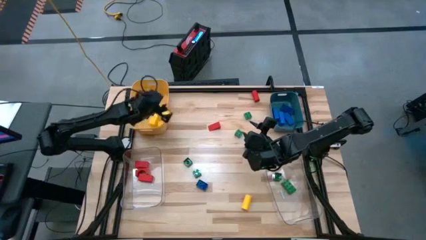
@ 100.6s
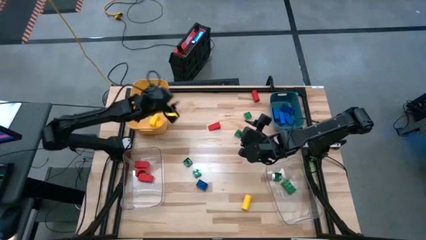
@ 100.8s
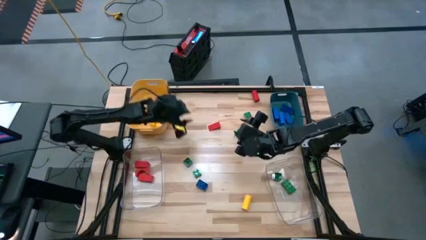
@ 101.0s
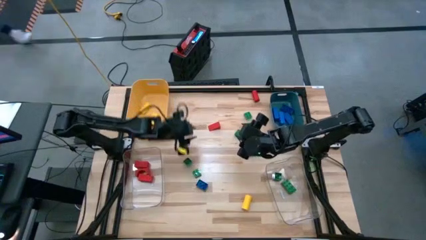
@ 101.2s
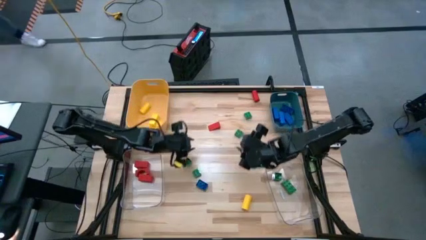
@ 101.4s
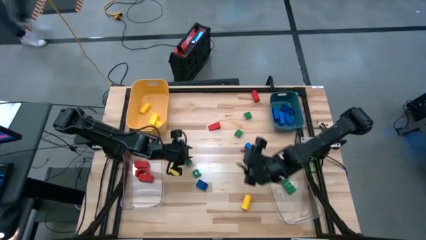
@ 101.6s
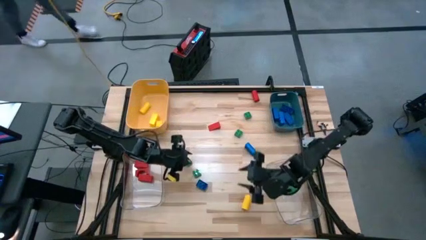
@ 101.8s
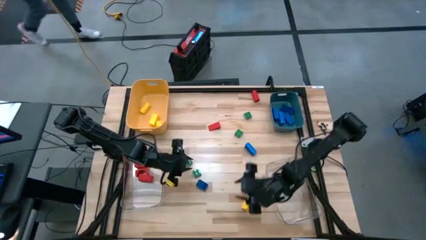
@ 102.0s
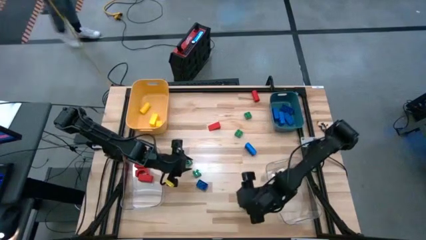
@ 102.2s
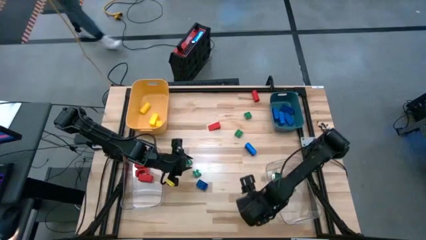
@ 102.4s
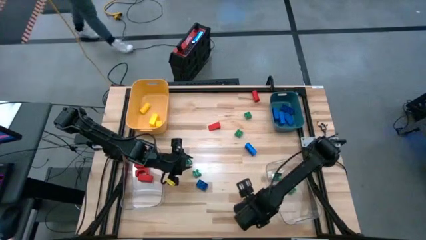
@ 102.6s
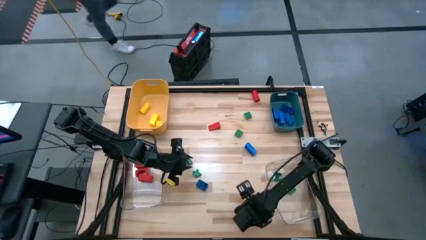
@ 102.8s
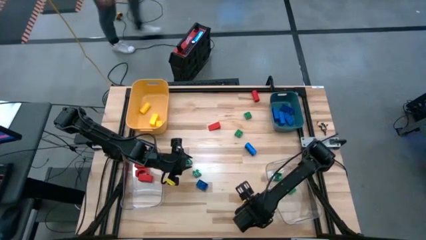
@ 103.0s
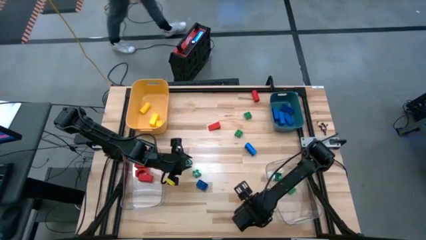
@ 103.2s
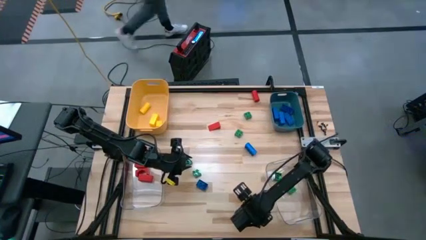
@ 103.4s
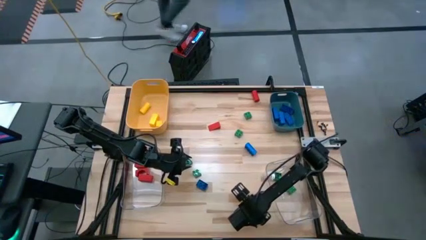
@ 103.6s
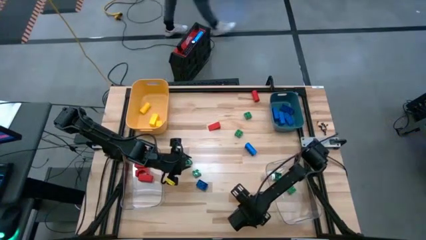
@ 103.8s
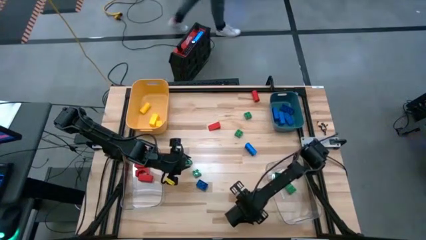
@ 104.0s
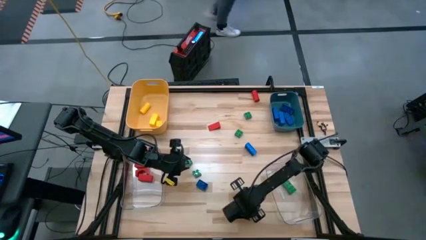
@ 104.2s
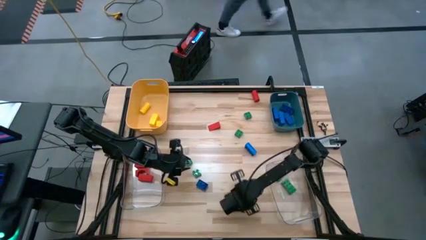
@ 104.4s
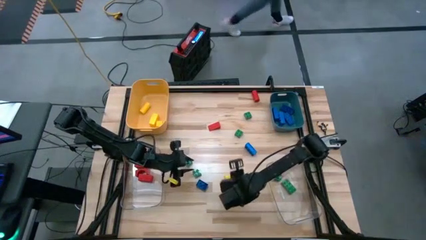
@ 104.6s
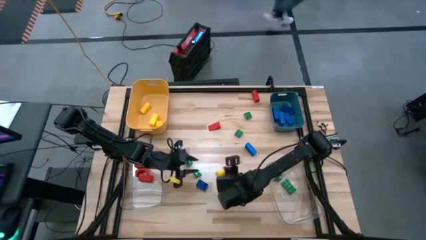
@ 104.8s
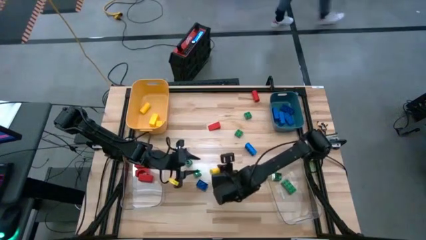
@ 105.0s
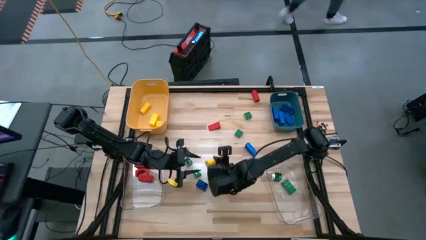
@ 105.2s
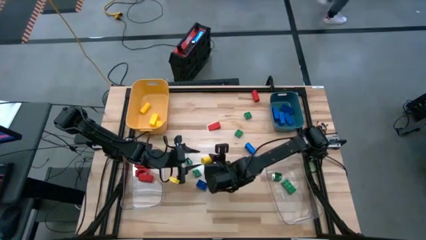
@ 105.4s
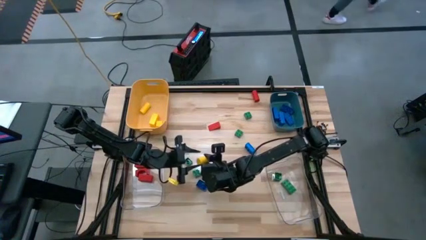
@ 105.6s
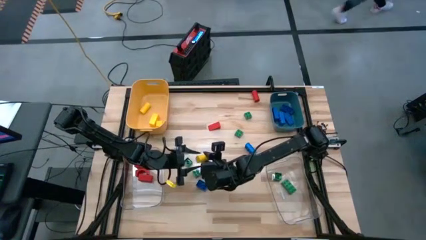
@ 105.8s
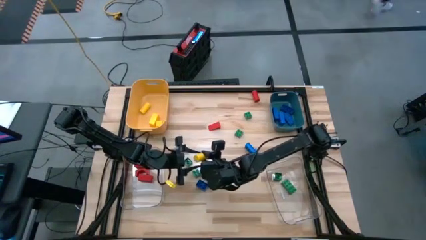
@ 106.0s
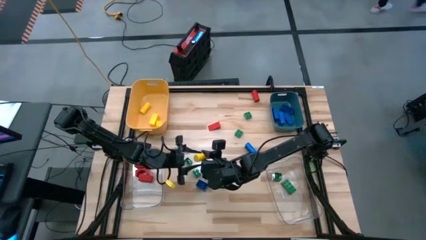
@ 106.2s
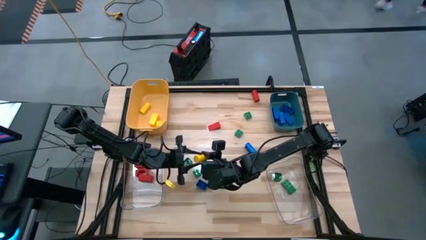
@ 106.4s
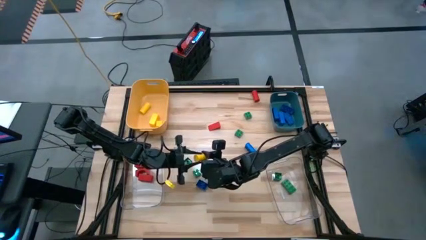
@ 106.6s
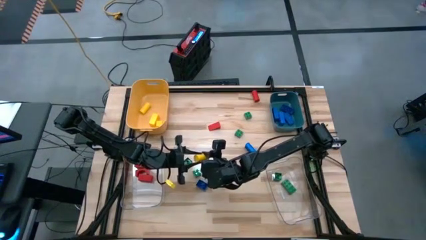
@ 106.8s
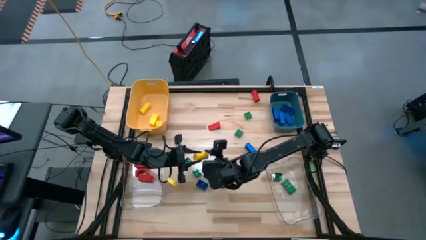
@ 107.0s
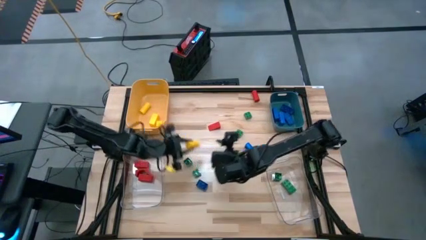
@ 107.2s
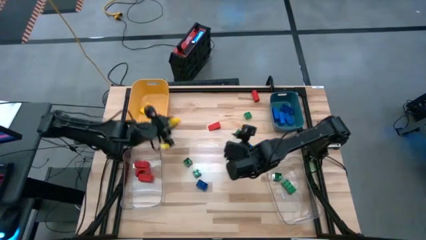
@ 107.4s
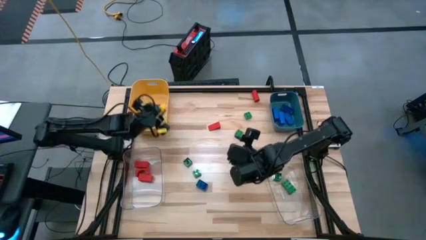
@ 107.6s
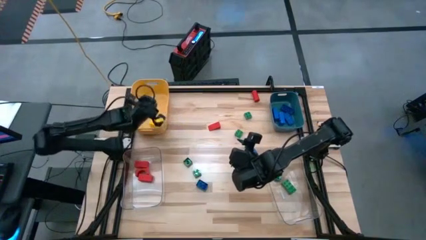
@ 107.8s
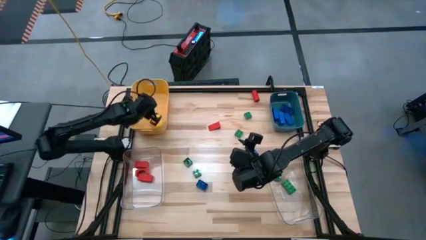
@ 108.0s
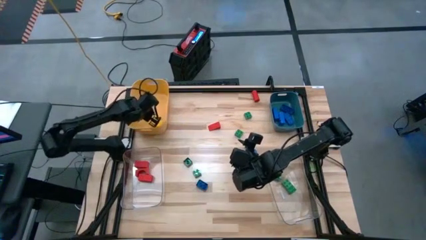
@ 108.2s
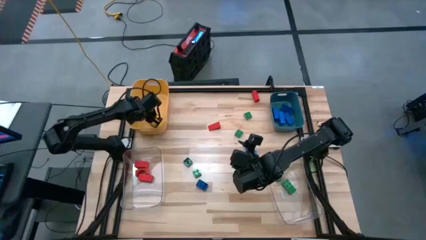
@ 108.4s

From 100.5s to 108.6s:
Task: Sort blocks
Put the yellow wooden block into the yellow bin

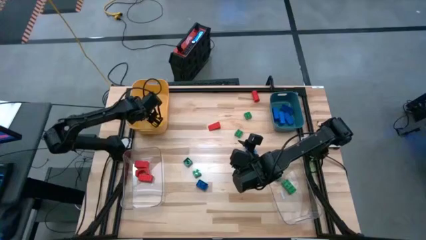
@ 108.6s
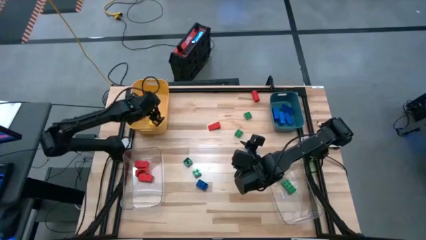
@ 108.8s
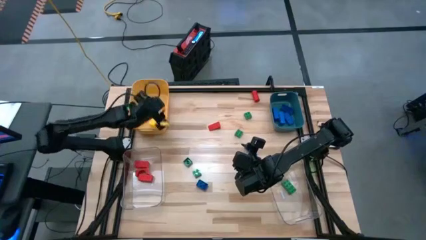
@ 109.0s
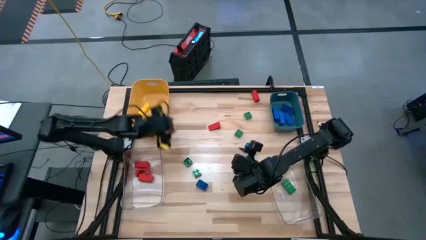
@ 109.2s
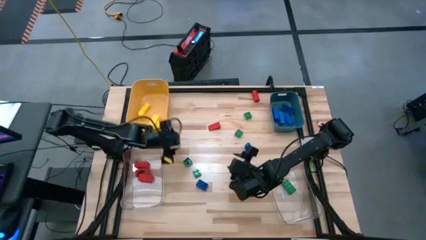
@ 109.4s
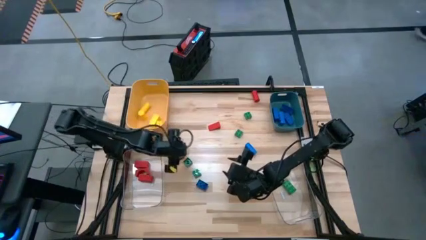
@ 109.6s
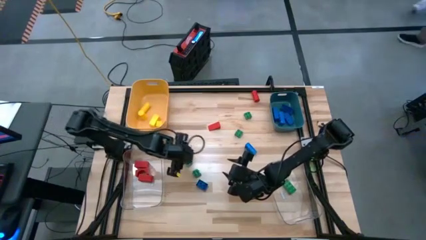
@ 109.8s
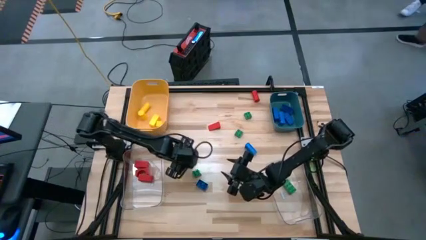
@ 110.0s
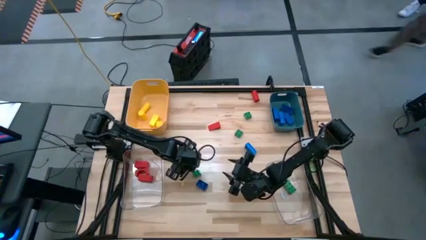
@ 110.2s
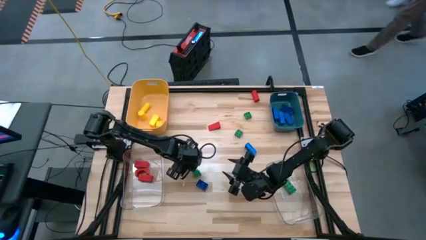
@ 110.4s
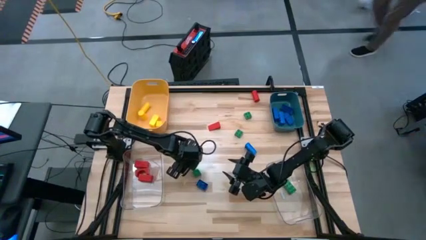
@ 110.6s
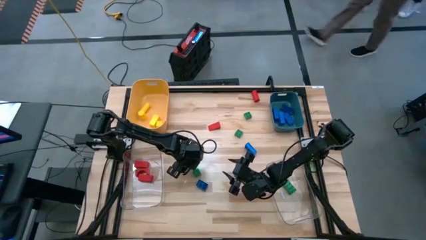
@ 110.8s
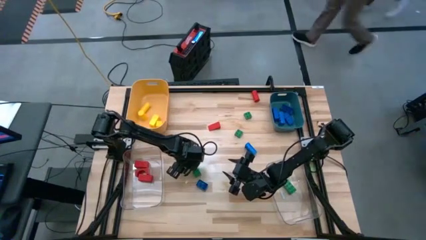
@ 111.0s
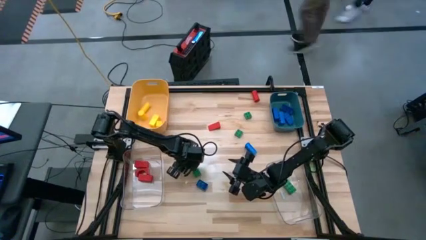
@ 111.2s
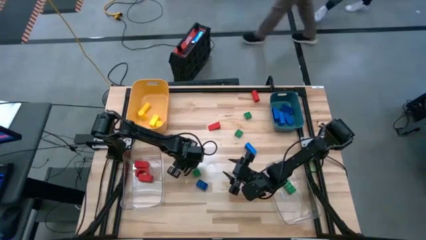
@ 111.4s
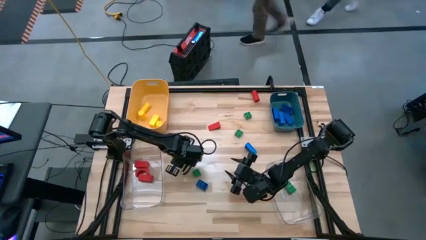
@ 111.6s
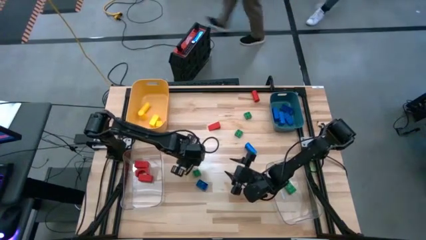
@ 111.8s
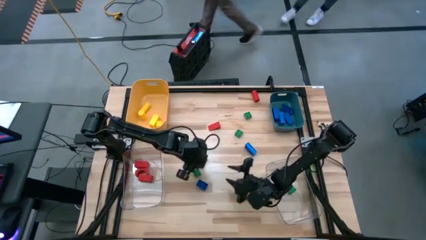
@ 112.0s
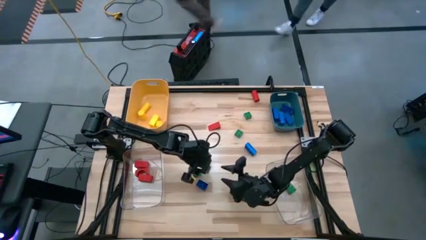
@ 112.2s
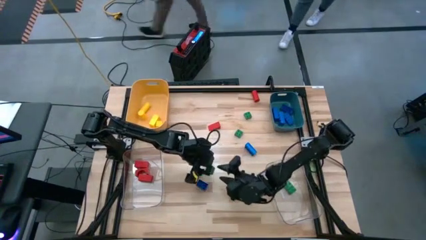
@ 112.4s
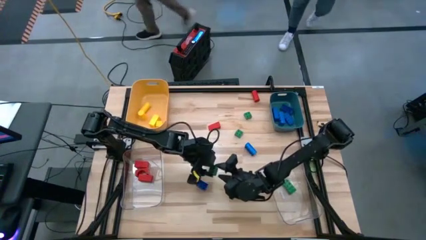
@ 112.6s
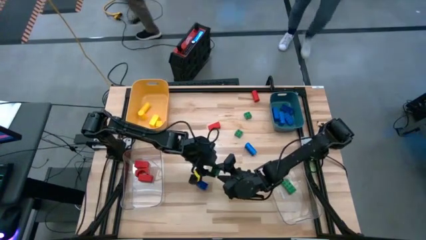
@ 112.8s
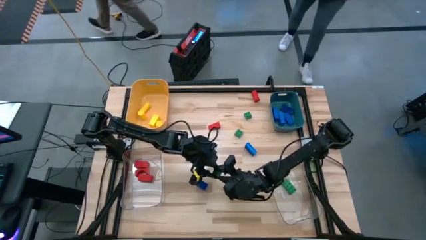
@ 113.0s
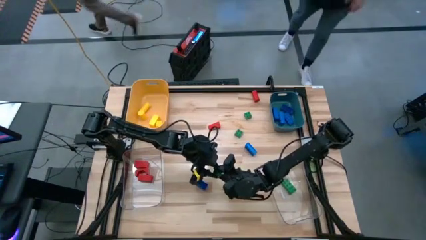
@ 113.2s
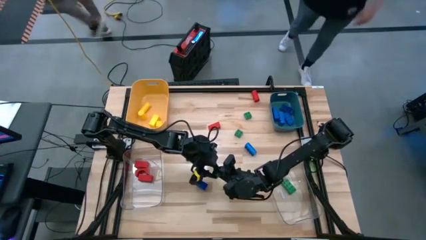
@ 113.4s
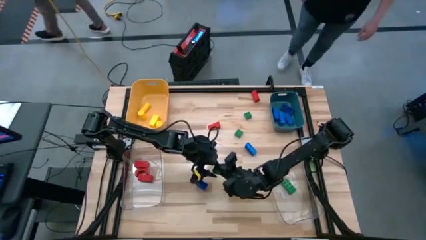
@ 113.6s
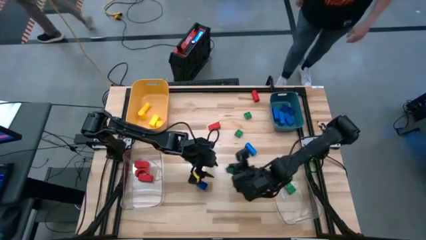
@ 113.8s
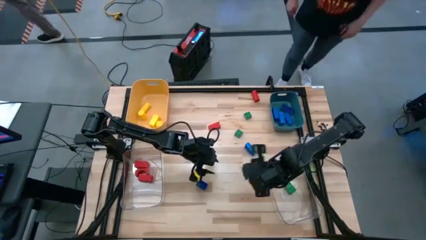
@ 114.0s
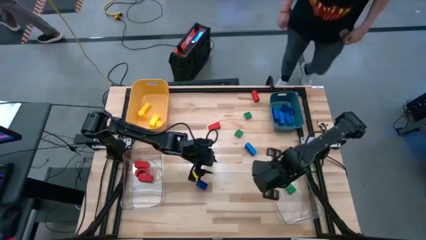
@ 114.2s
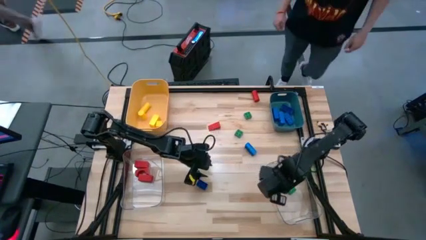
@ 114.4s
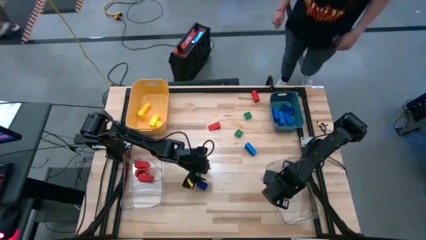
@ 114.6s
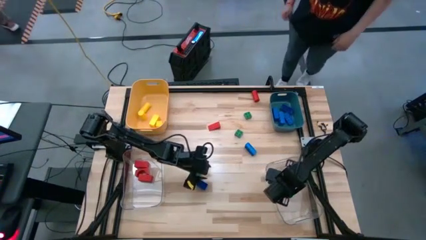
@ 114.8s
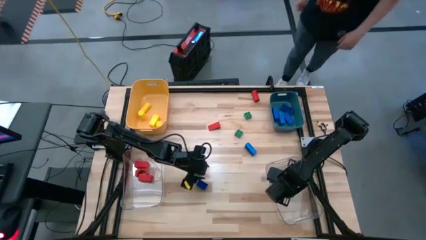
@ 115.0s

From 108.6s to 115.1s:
Put the green game piece into the right transparent bin
